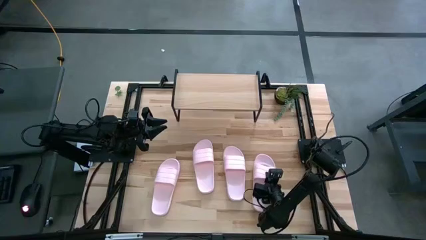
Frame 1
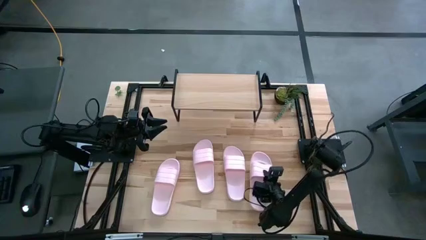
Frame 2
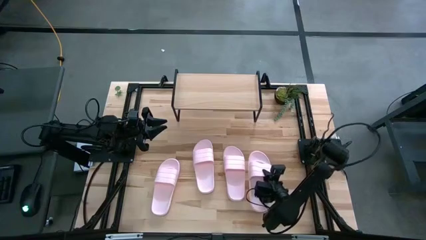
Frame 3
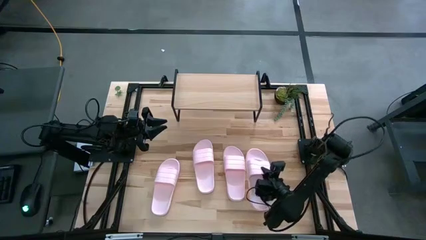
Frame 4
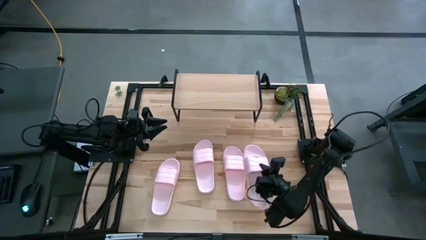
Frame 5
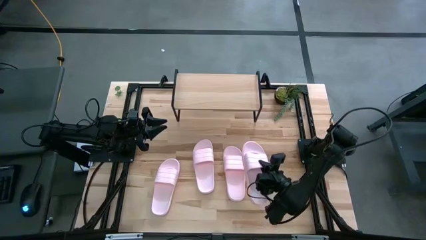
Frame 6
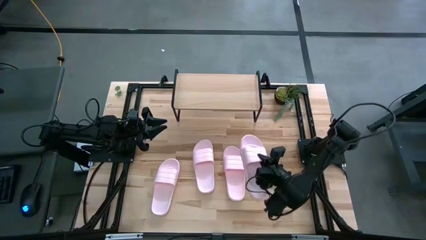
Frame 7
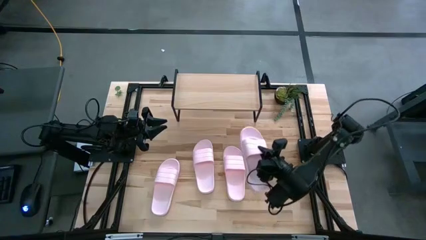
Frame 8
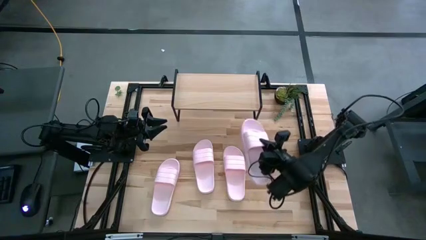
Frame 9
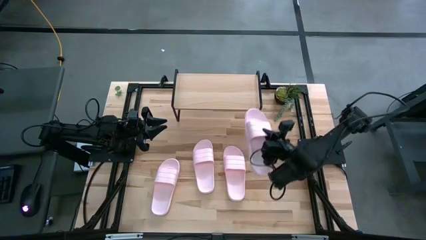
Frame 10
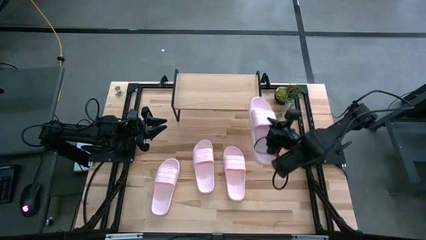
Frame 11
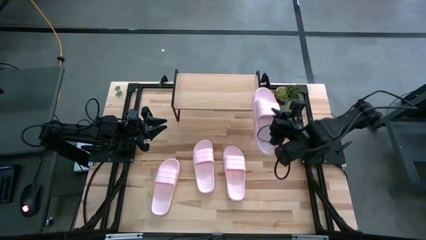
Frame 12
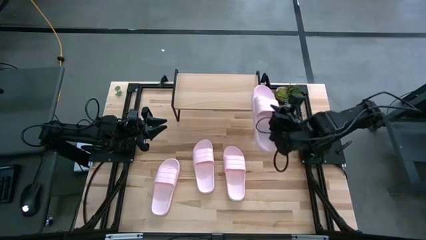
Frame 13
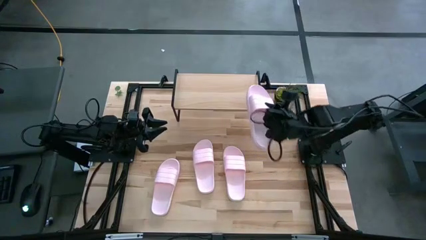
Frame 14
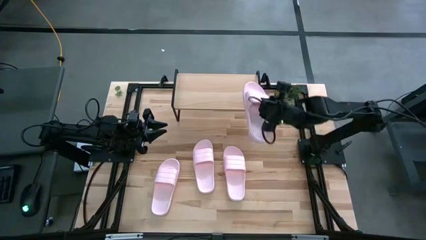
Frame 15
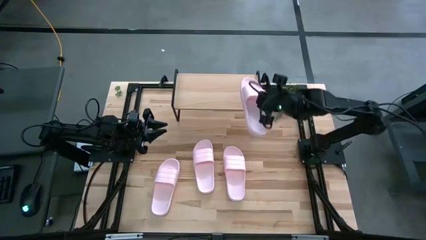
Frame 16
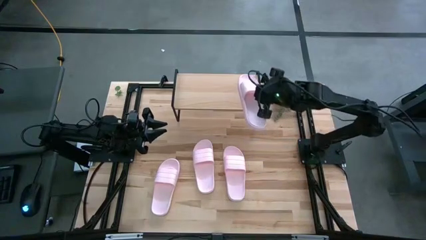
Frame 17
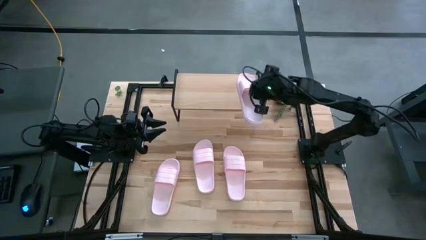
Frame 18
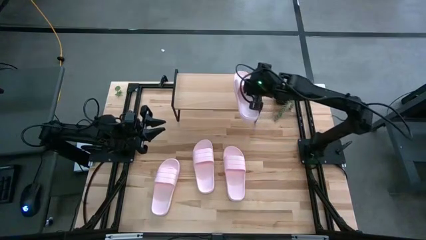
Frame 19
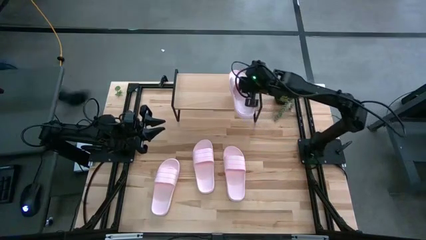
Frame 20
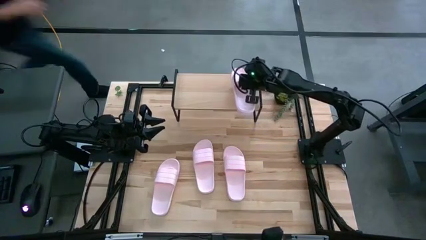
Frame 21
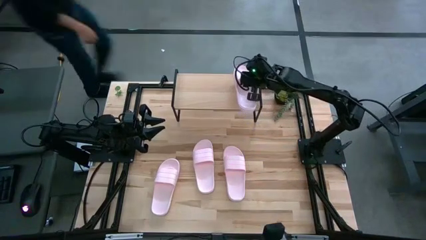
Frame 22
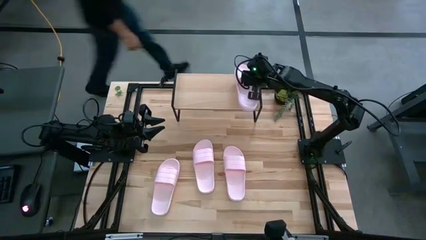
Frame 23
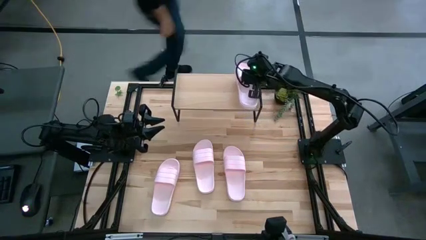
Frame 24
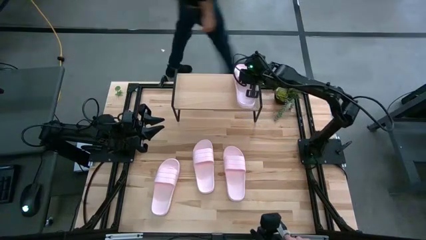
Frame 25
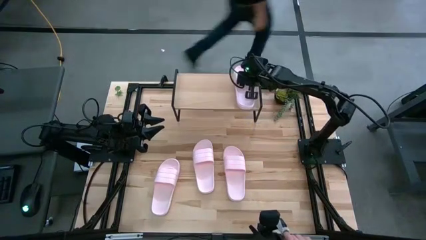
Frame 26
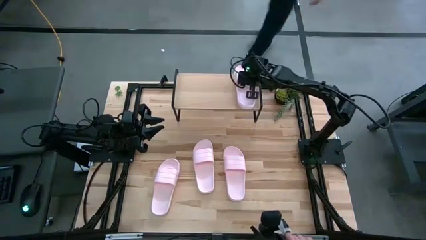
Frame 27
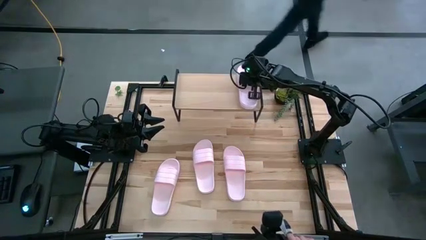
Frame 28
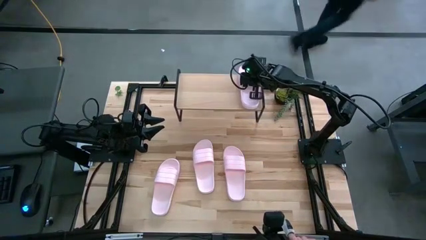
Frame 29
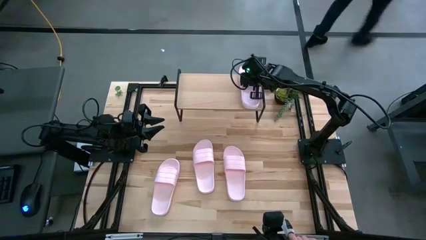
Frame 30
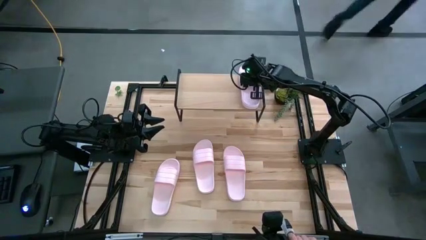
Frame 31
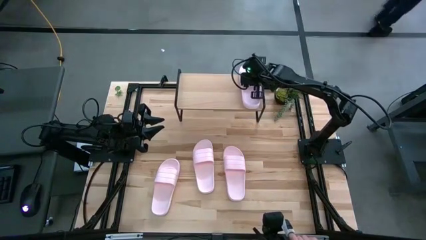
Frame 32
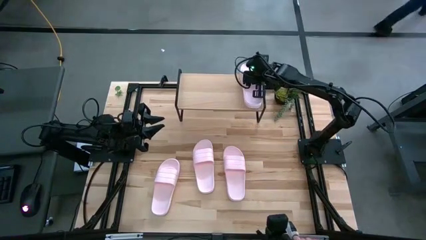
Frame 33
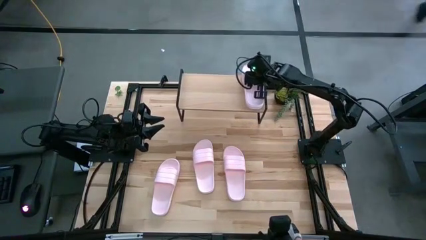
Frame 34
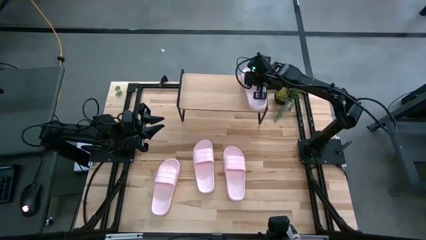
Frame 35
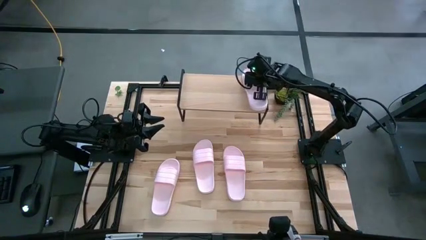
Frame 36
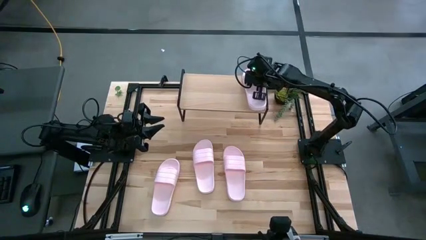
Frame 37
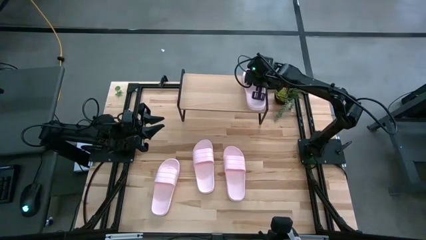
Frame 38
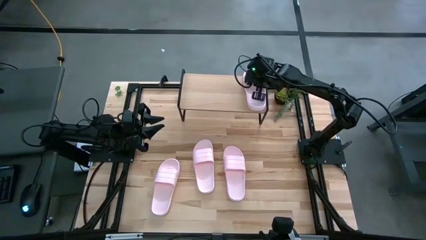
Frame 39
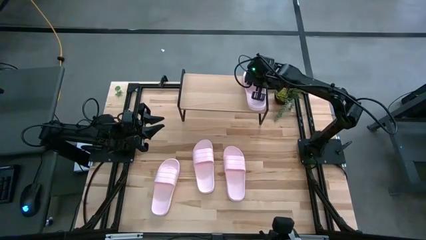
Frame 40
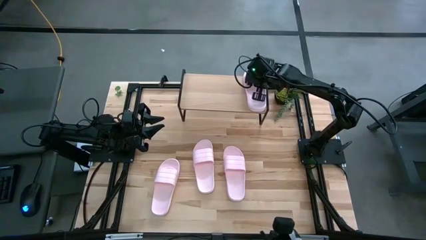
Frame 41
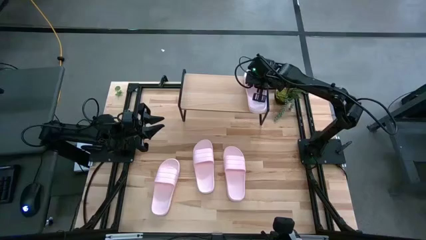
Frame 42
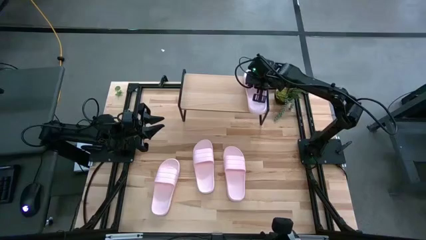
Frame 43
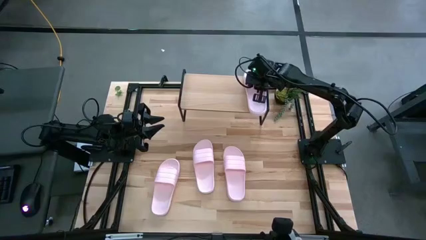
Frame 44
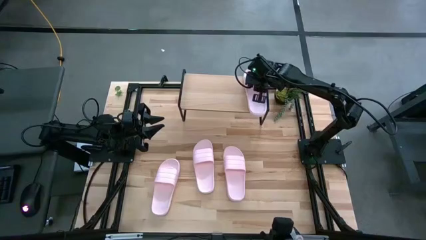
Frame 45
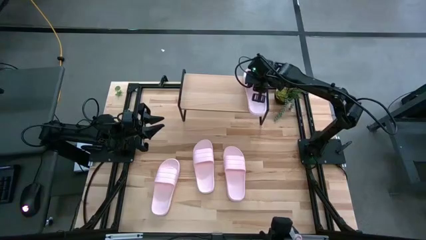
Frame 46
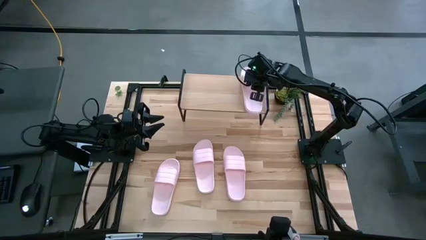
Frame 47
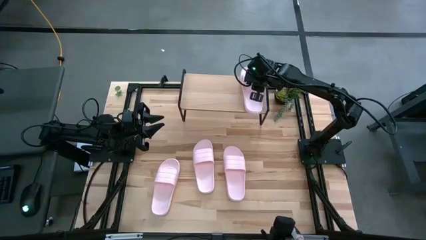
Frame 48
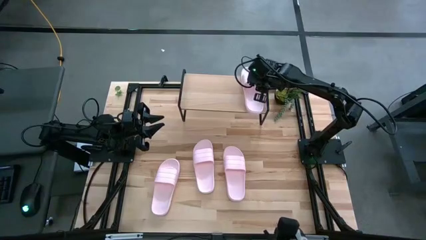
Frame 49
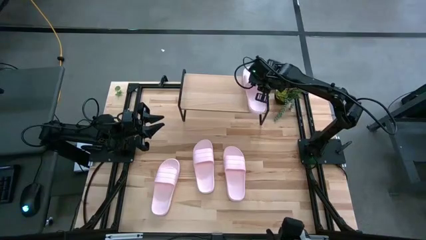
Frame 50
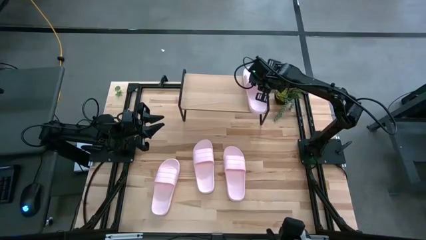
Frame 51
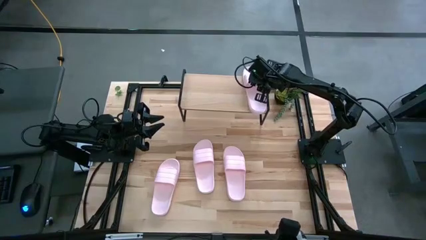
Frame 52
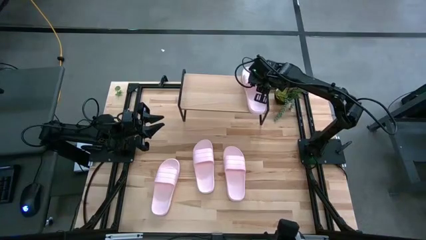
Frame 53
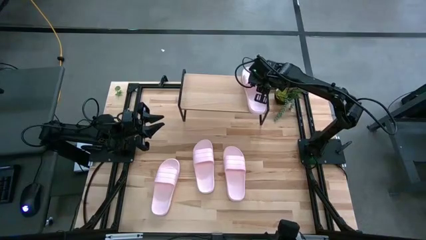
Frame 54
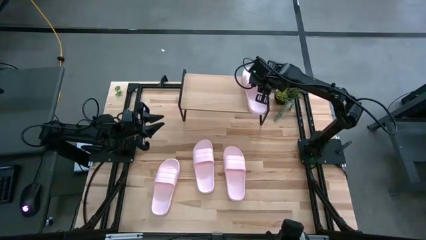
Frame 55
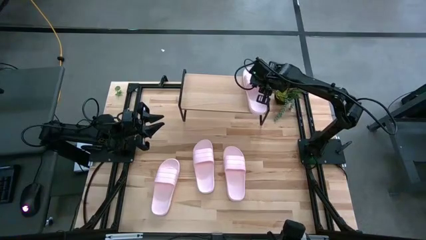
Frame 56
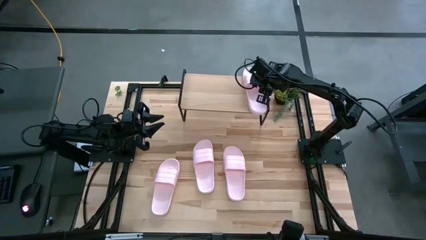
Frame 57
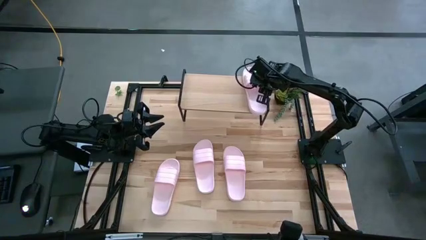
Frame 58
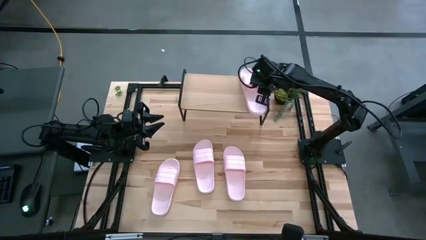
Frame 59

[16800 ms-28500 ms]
Task: Pick and place slides into the shelf
Put the pink slide on the shelf
